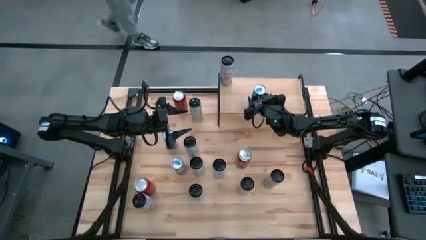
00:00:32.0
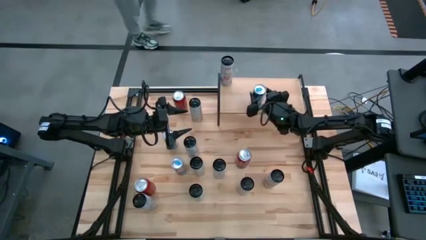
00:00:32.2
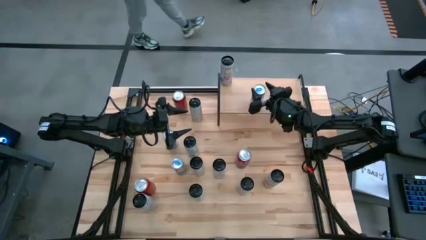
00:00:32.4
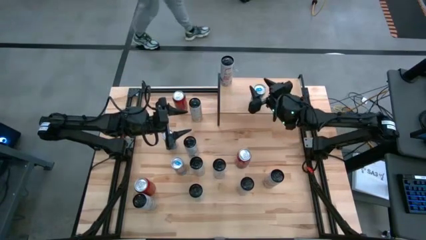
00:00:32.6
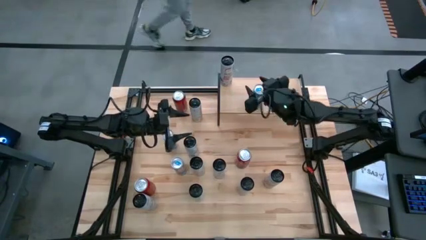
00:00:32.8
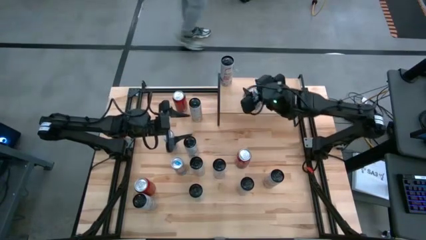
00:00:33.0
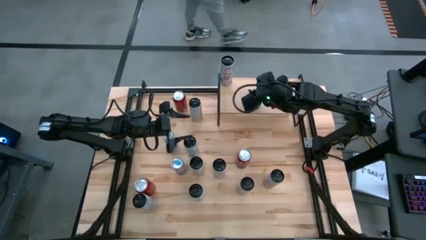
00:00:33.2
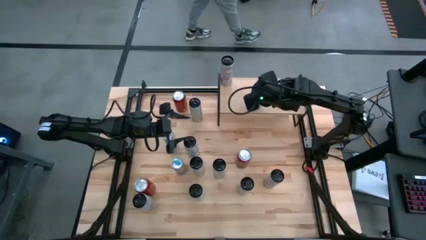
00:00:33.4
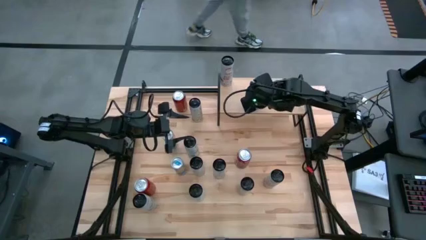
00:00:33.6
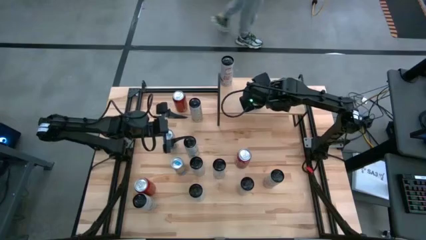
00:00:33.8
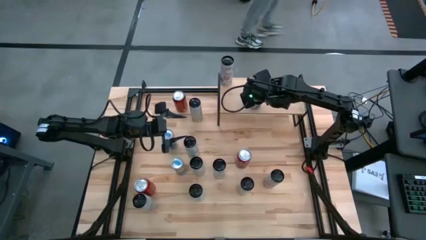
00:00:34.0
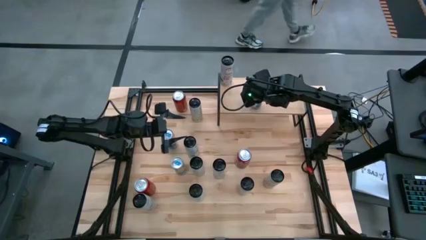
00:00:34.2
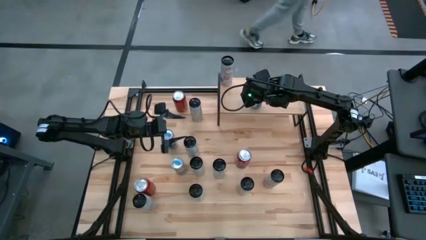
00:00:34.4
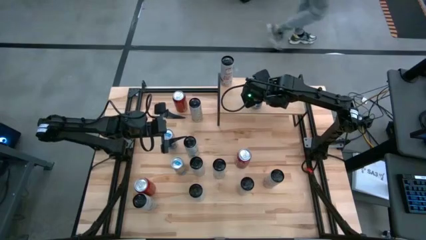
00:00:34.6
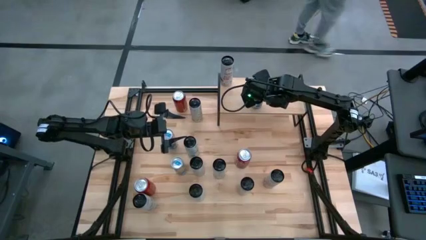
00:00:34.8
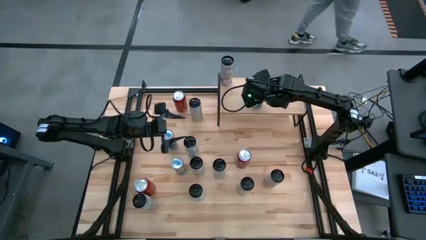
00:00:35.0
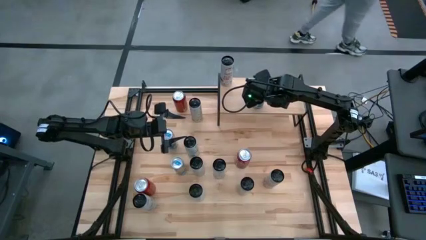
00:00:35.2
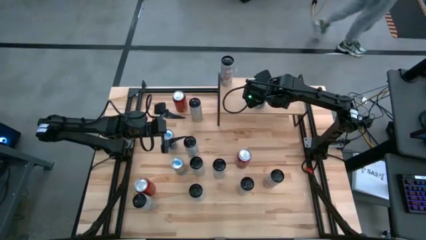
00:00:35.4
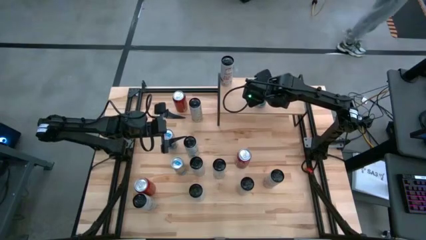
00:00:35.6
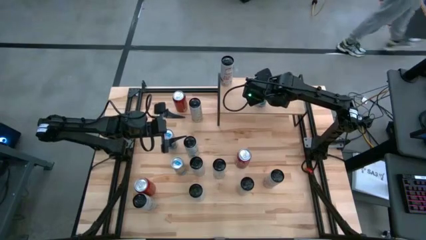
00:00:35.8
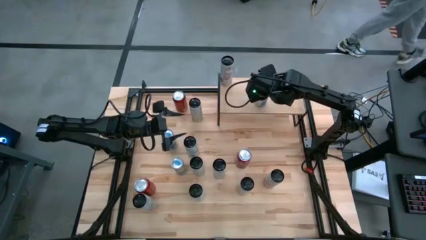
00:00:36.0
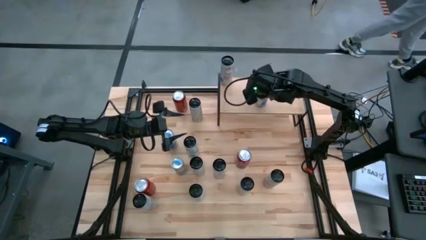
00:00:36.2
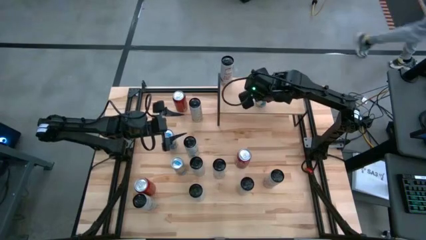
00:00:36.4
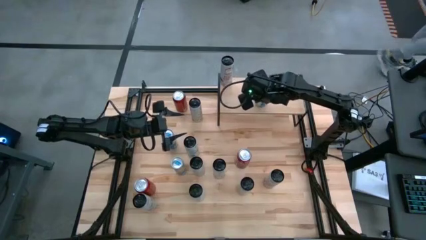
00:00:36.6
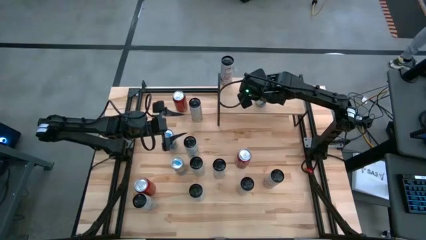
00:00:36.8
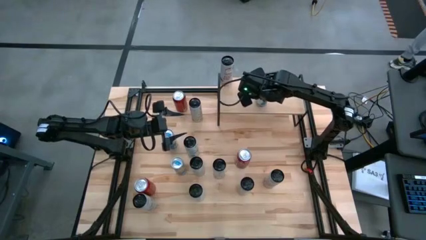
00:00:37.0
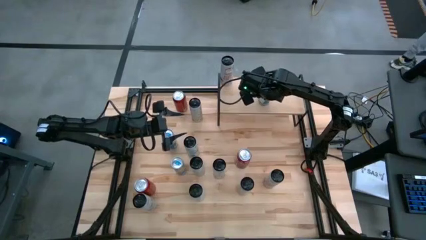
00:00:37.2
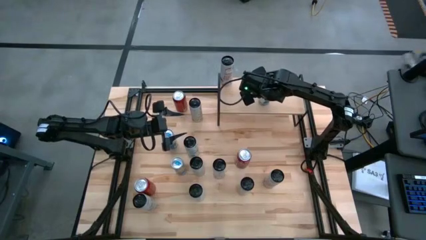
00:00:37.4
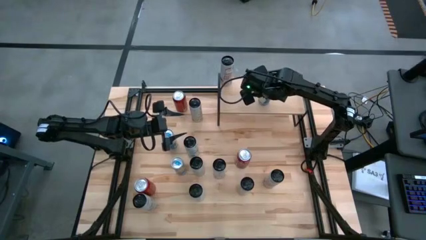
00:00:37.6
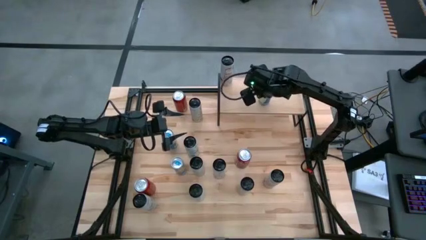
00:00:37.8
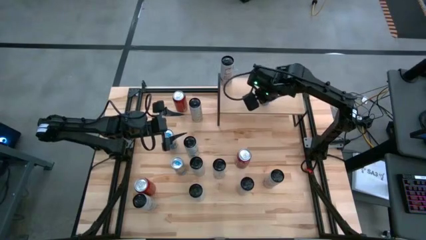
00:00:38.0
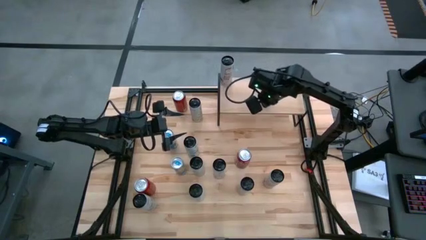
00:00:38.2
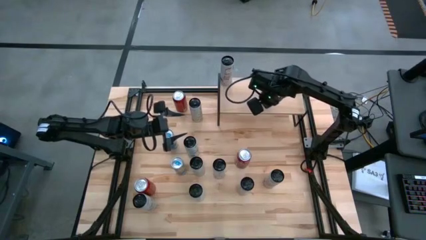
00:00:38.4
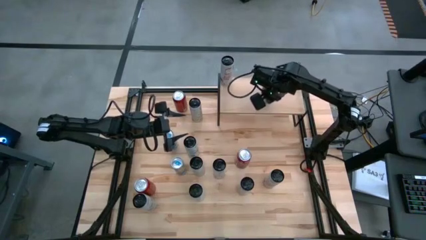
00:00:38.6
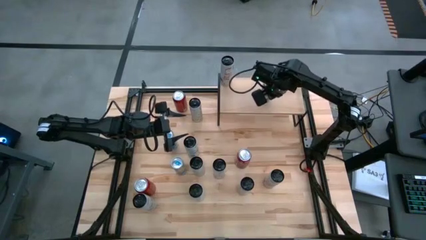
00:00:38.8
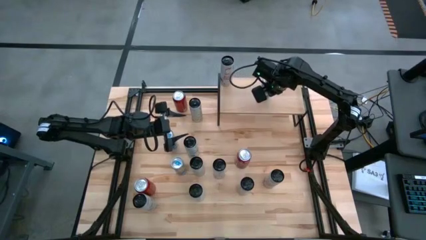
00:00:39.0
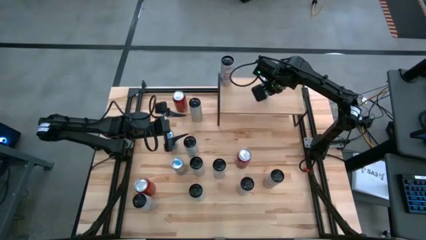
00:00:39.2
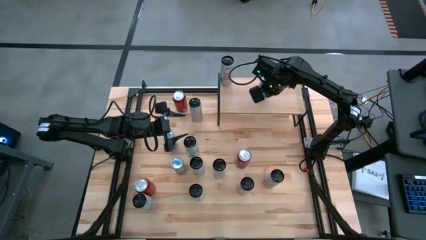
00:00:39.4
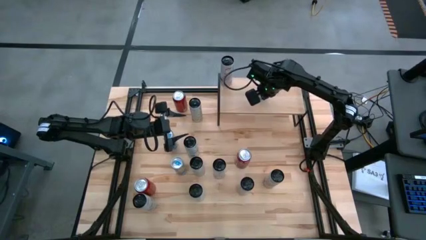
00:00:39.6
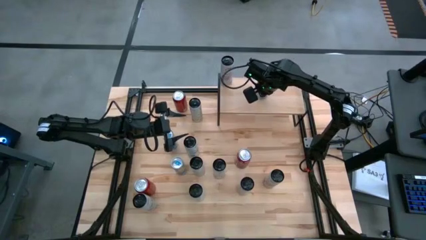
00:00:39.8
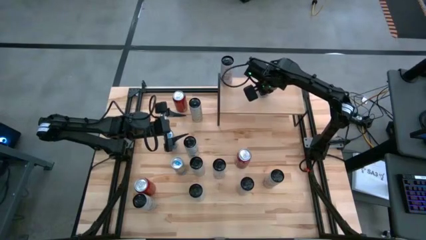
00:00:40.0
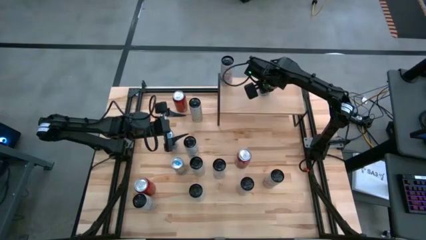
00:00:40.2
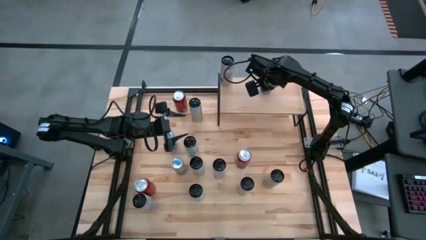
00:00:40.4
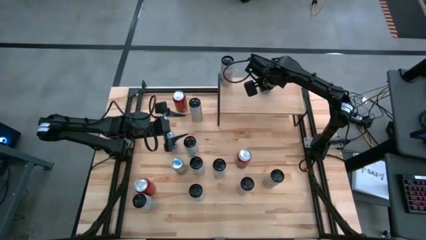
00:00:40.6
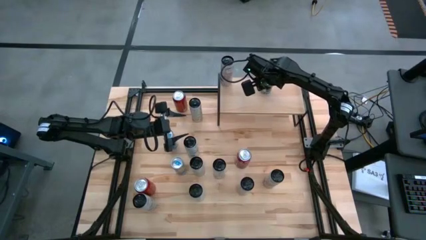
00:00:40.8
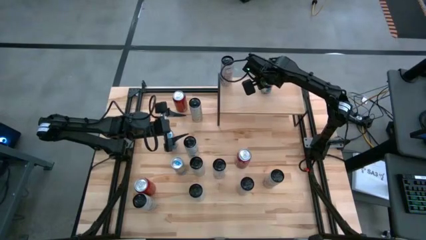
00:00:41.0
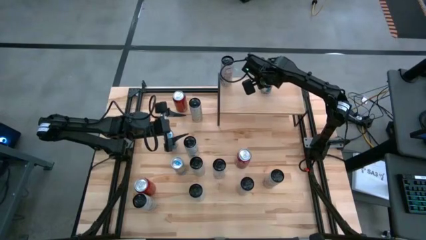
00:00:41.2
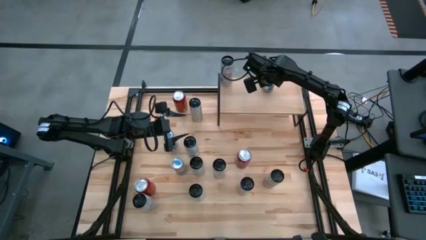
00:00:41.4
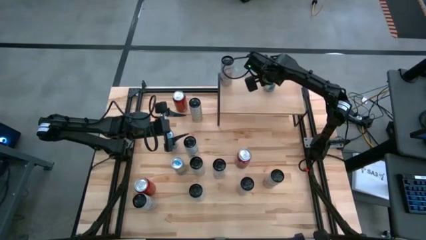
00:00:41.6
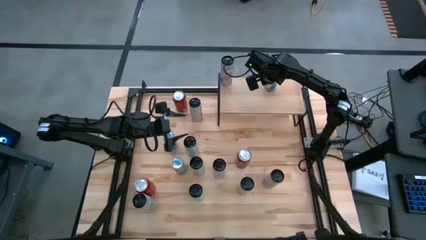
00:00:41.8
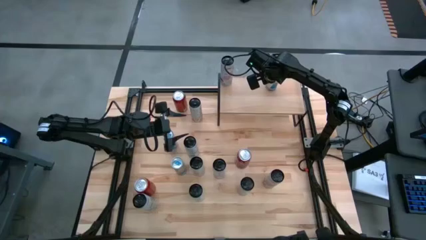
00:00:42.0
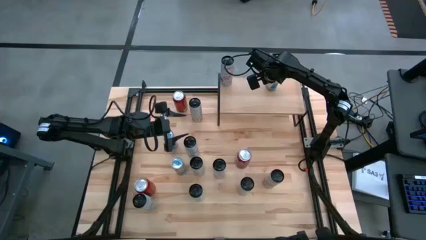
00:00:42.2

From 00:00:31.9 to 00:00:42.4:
Task: Place canned beverage on shelf
Put the top blue soda can on the shelf
